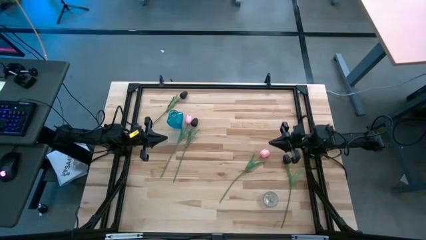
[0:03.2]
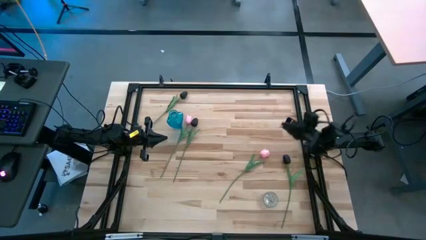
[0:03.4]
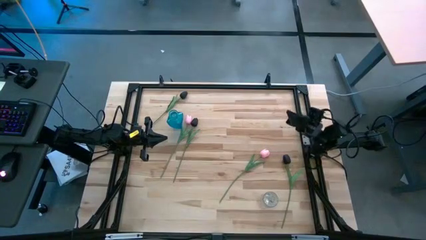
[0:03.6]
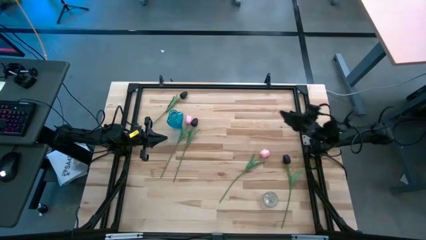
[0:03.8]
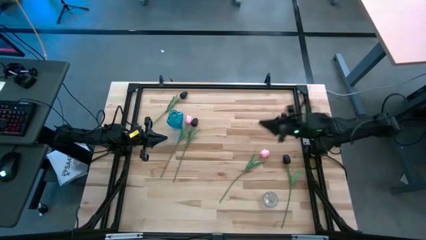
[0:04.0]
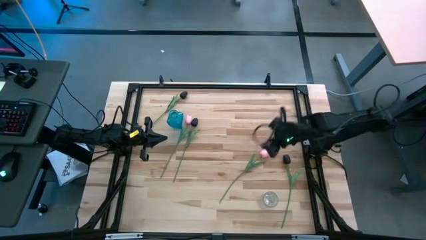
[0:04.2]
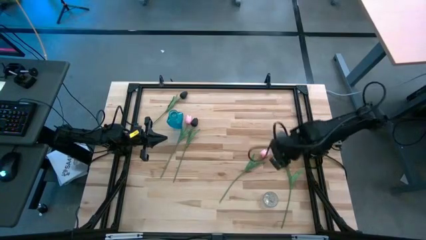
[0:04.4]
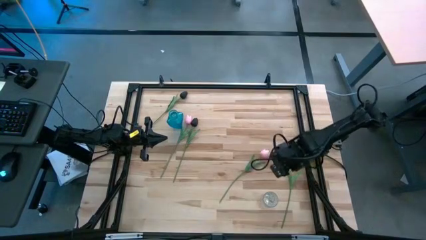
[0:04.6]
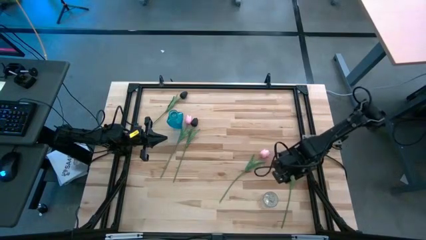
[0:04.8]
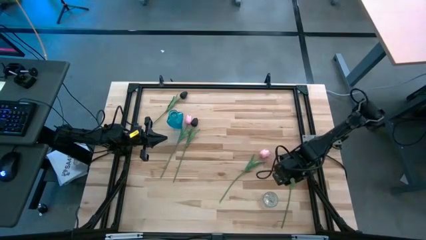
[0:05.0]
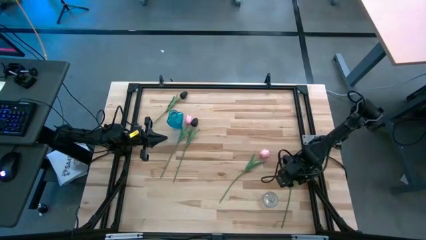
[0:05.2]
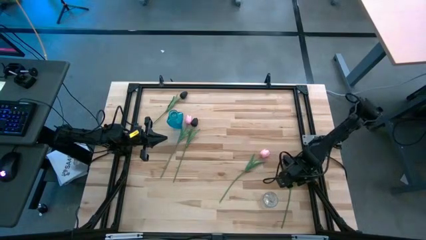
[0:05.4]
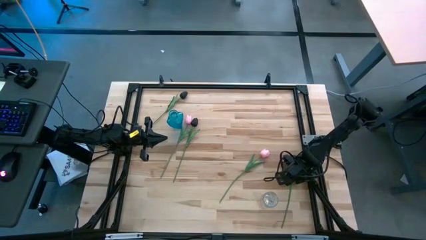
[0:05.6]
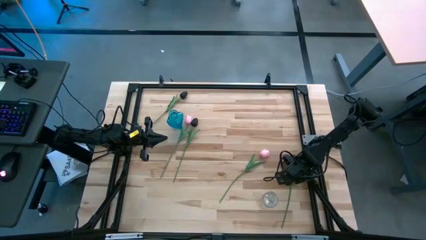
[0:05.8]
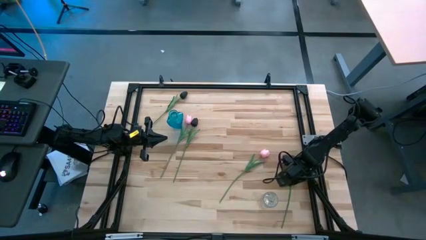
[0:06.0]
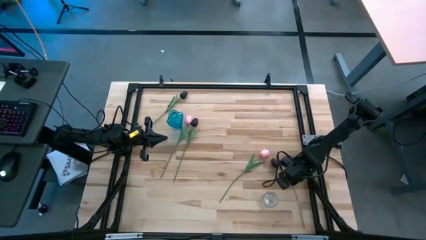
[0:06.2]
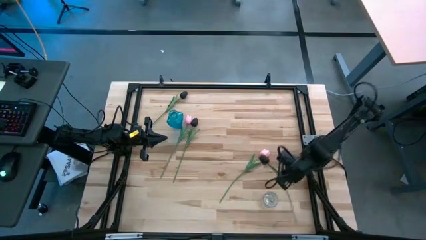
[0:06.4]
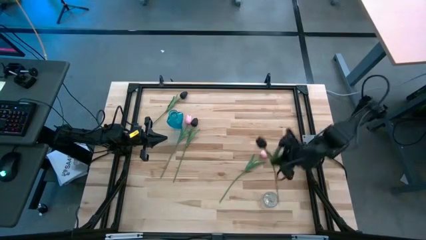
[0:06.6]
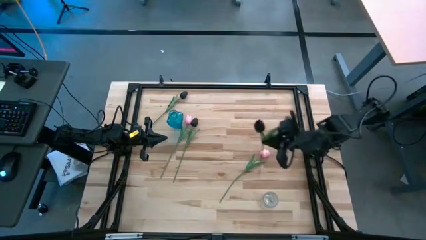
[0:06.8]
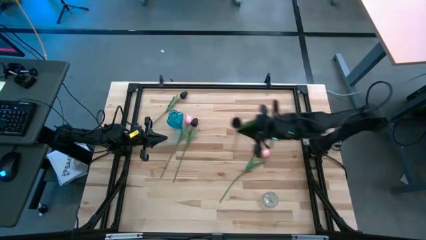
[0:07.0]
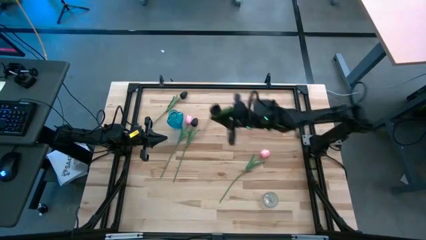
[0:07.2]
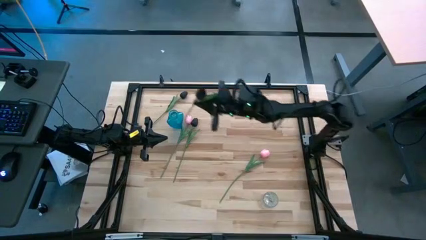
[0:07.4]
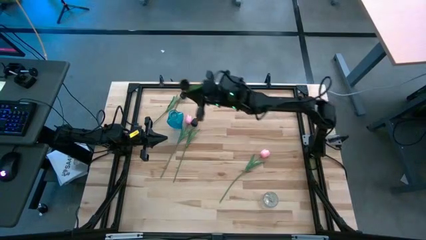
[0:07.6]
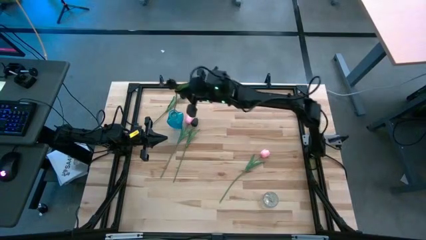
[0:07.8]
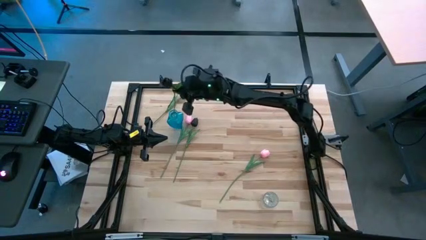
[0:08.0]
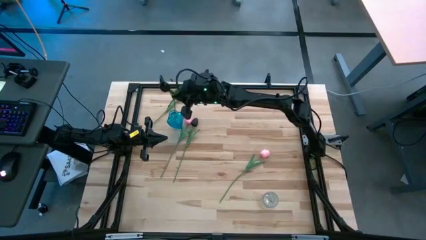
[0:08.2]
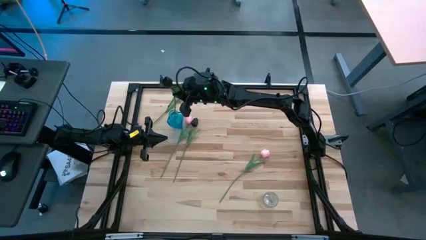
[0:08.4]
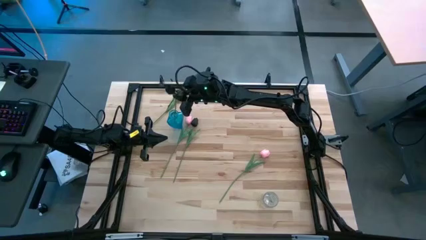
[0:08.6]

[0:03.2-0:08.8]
Task: Sort flowers into vase by color
Put the bottom right black flower into the blue vase

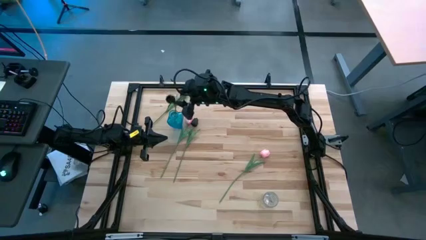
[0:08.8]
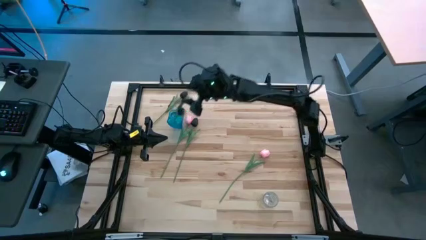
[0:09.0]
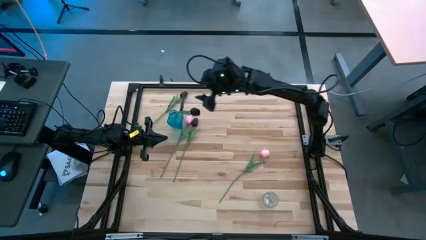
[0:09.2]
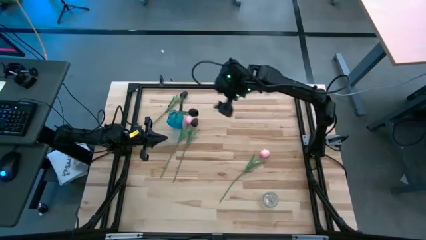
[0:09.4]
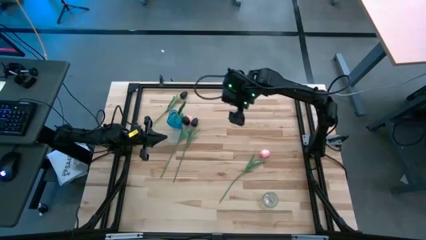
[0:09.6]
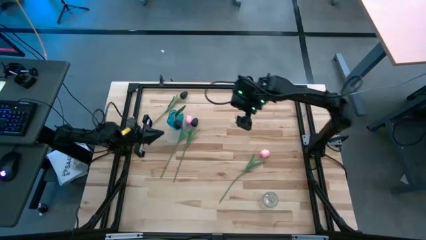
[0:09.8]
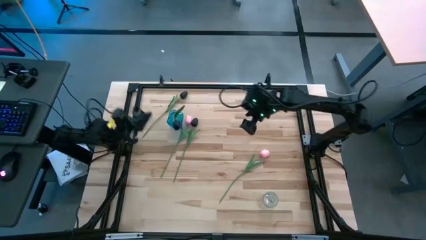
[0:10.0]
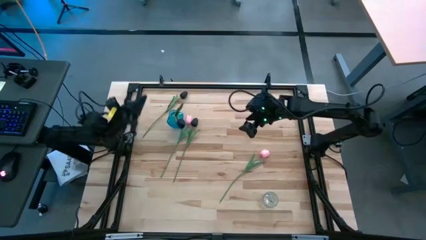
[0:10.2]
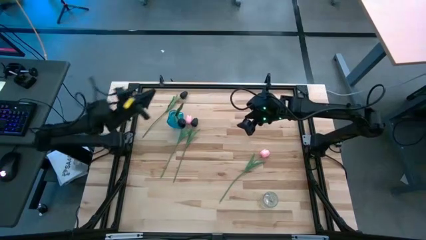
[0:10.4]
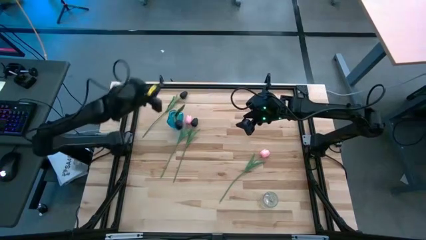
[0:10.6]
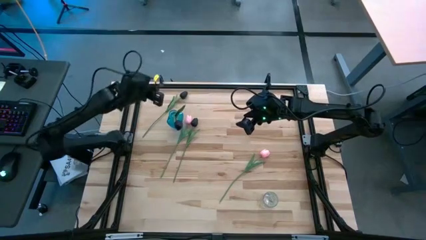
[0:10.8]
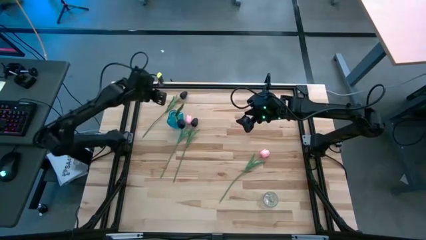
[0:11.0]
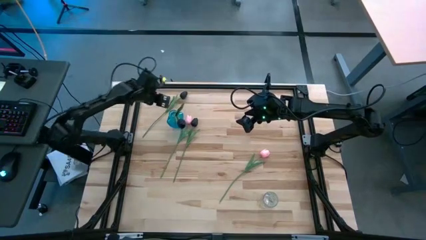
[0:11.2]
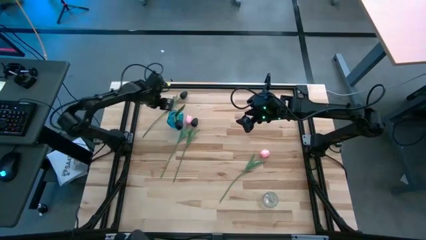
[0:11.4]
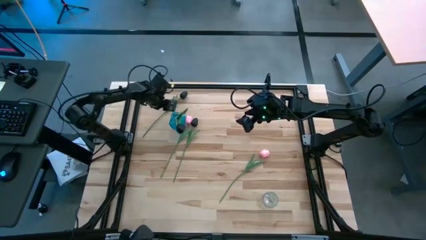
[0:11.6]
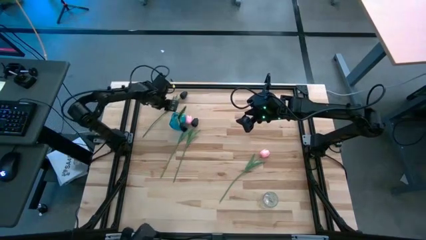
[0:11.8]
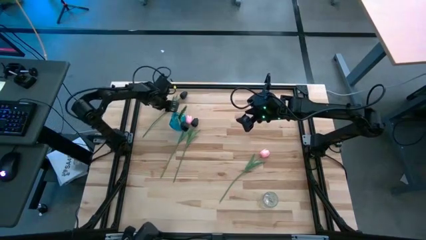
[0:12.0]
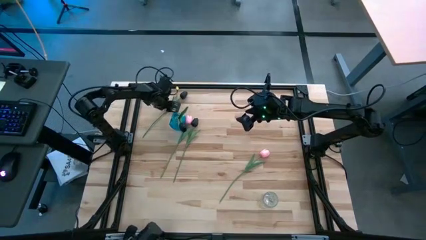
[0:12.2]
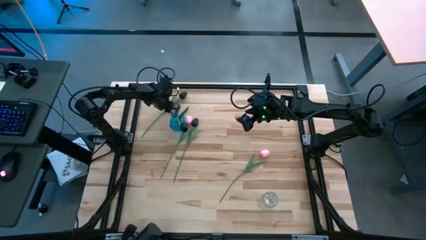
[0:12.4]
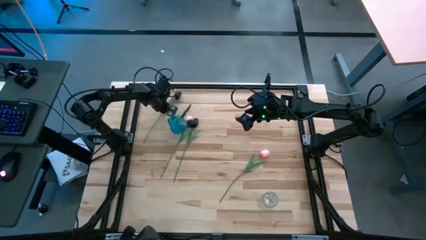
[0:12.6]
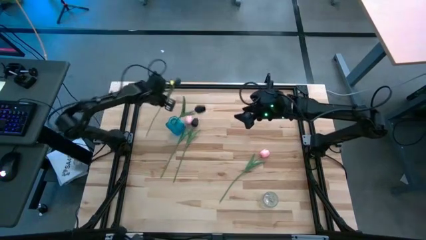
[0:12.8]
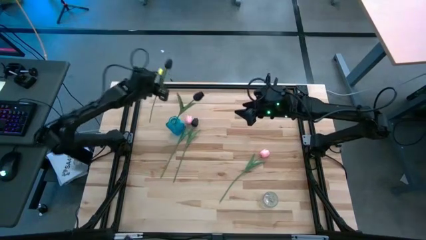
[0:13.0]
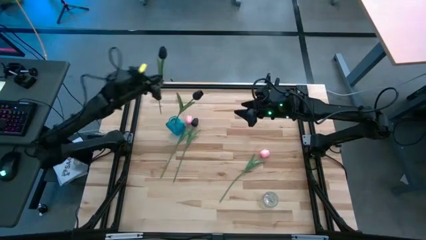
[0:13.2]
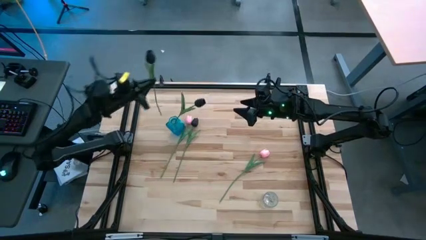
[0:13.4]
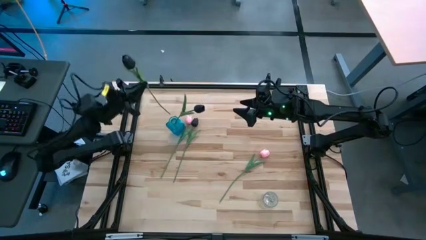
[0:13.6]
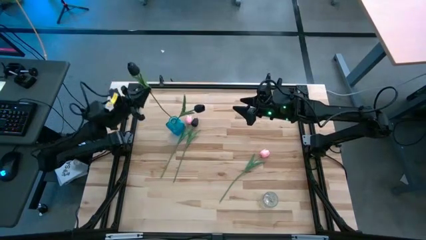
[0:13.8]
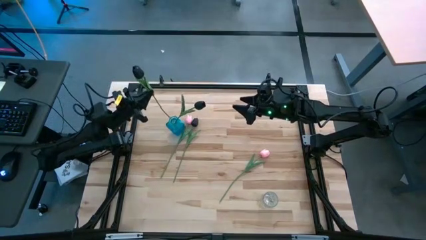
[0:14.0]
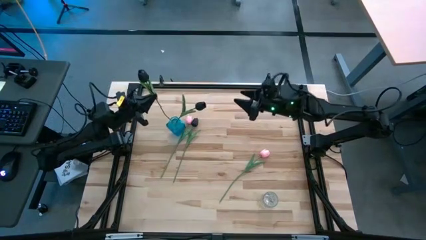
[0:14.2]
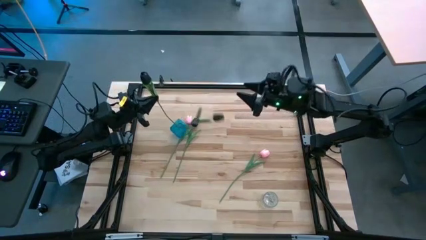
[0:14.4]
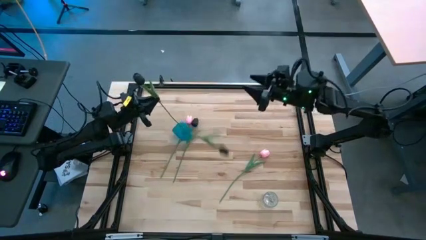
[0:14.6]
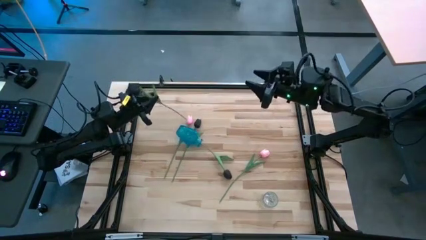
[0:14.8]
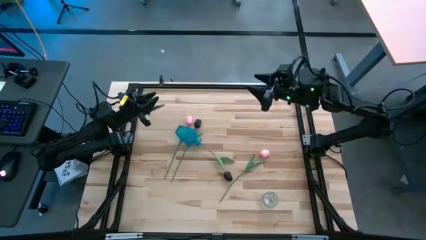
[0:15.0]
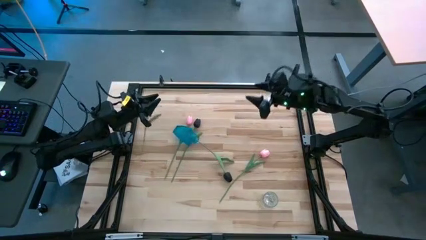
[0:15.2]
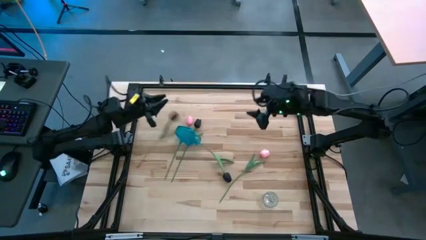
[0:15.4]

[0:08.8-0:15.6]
Put the top black flower into the blue vase

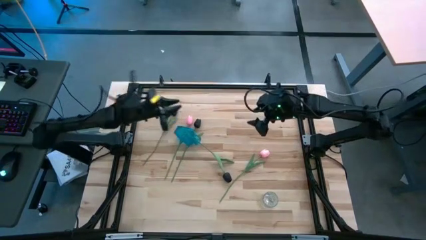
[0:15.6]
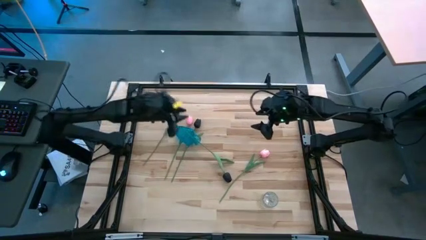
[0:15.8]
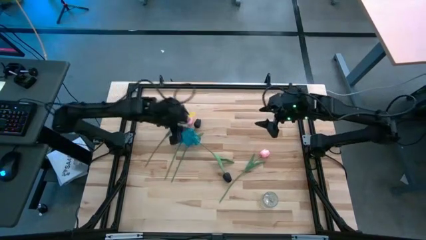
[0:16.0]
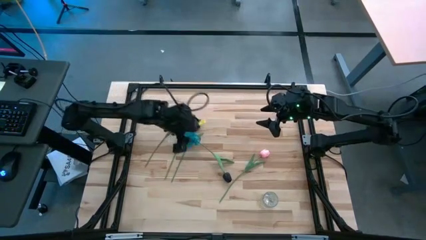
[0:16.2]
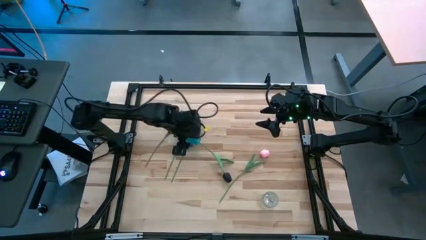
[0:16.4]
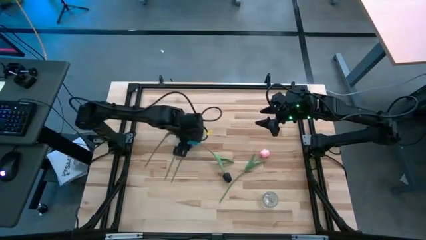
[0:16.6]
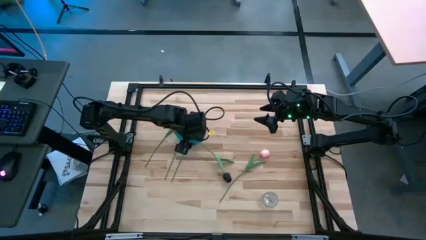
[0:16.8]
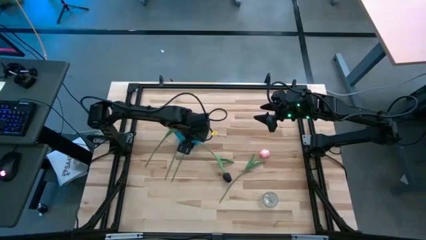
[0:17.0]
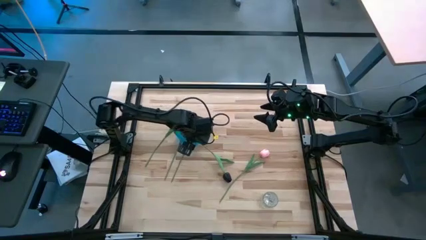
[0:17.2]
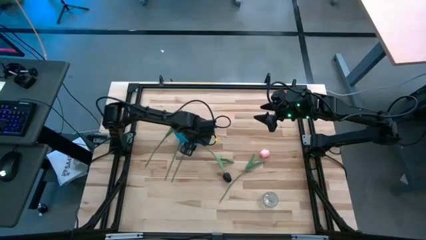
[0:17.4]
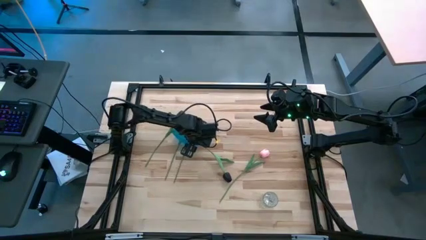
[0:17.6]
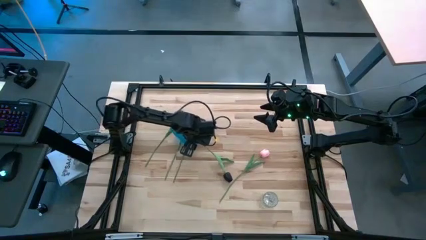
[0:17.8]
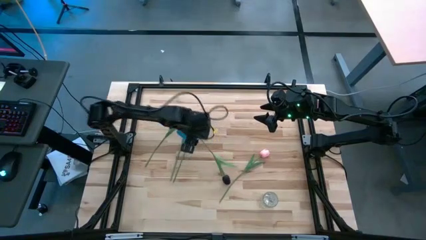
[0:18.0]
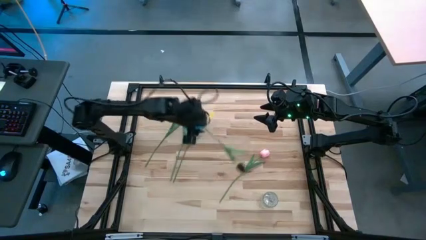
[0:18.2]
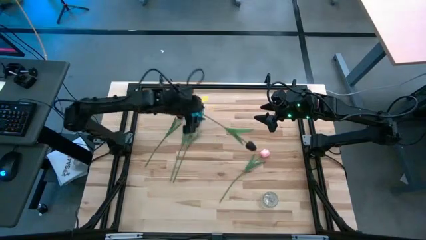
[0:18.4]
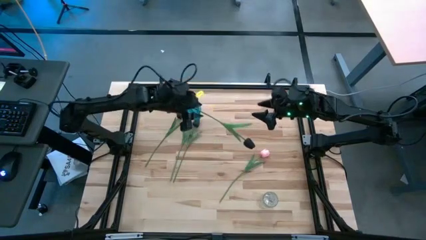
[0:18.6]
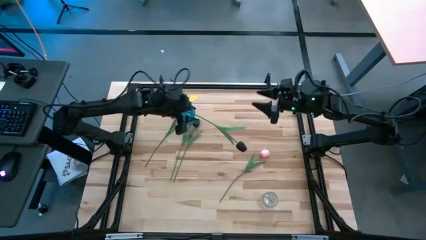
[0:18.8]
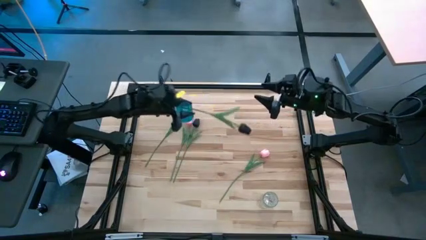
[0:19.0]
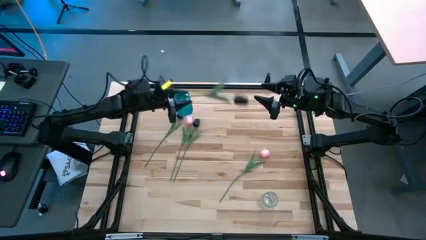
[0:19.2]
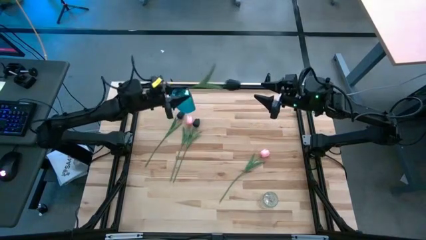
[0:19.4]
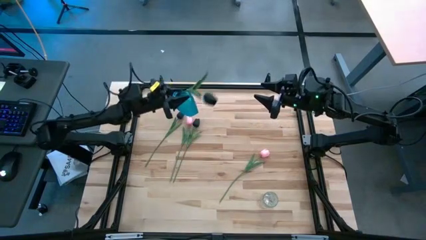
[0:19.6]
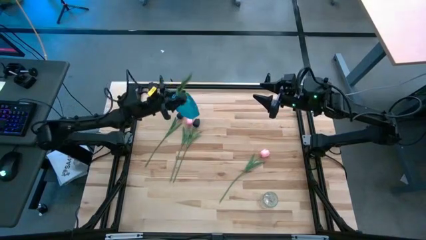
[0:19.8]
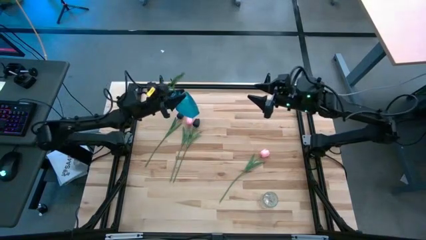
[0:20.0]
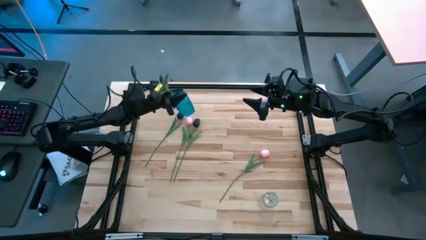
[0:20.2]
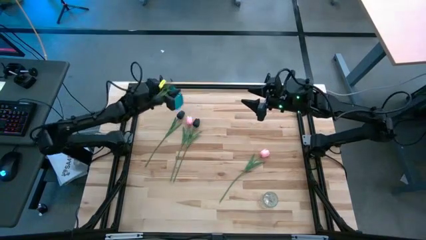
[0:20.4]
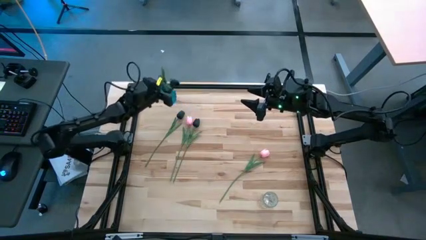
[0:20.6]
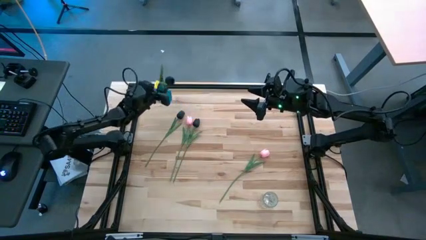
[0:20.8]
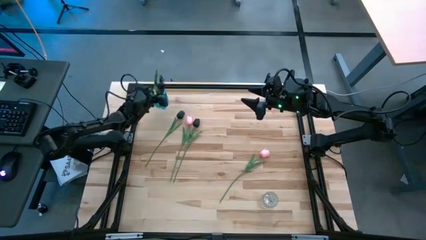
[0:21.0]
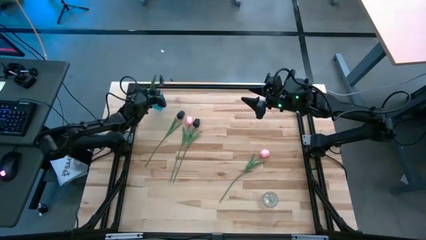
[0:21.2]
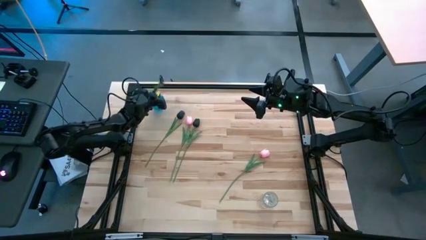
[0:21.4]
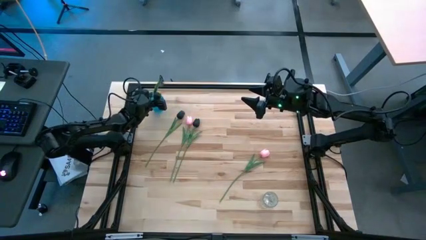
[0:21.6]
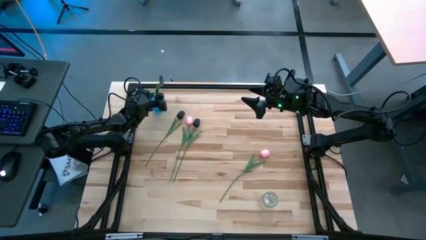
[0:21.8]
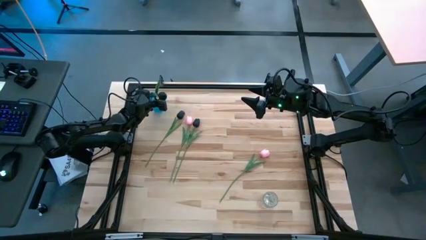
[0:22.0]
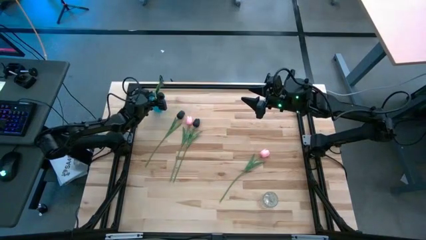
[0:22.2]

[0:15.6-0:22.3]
Adjust the blue vase
